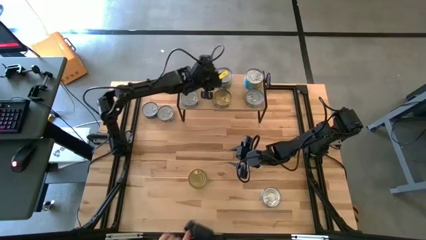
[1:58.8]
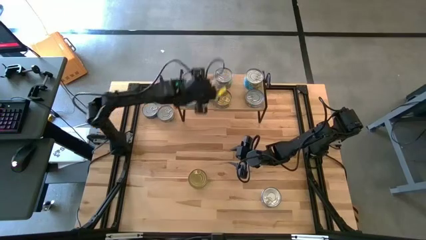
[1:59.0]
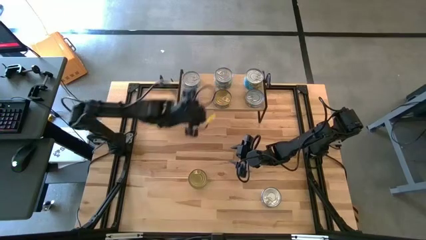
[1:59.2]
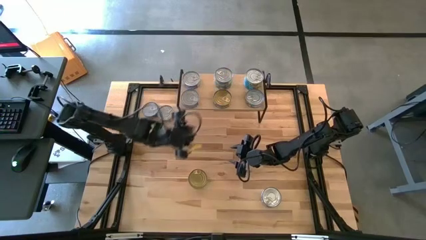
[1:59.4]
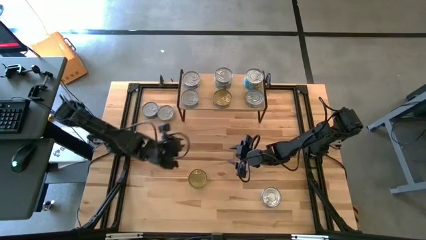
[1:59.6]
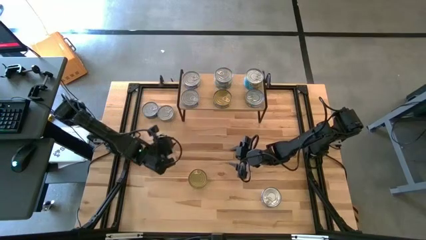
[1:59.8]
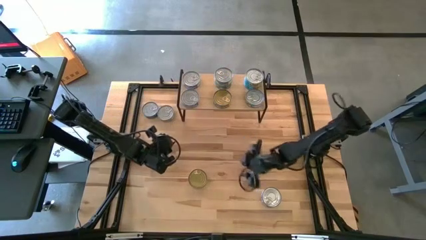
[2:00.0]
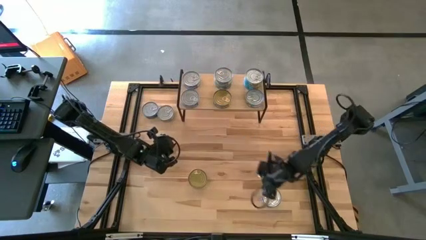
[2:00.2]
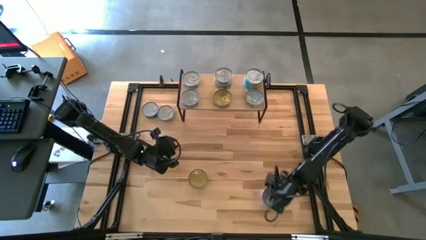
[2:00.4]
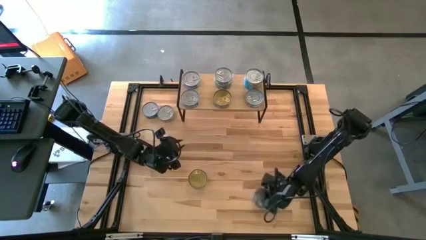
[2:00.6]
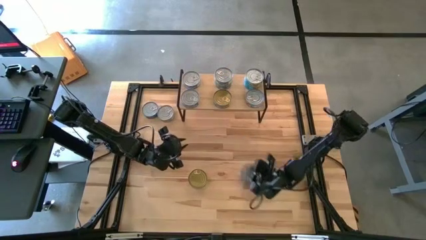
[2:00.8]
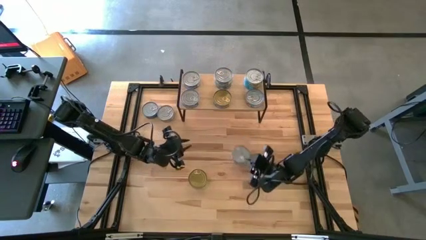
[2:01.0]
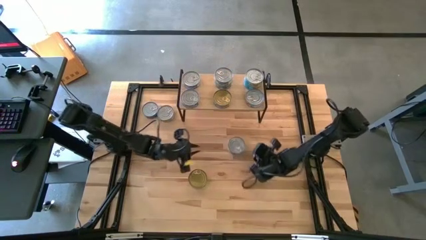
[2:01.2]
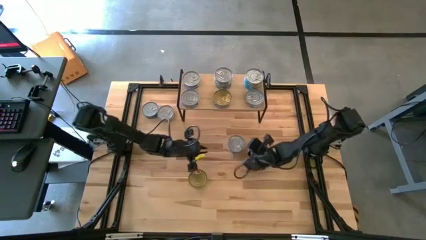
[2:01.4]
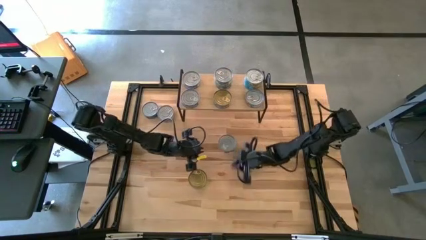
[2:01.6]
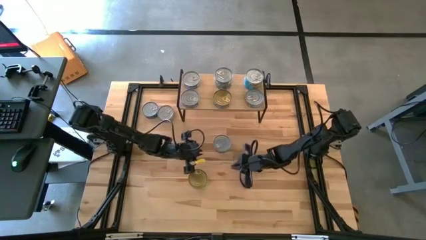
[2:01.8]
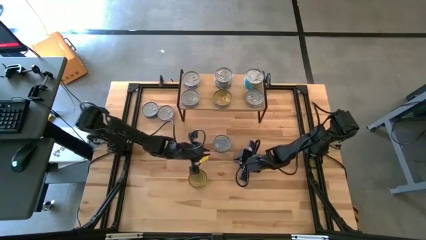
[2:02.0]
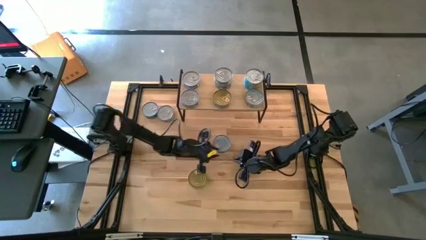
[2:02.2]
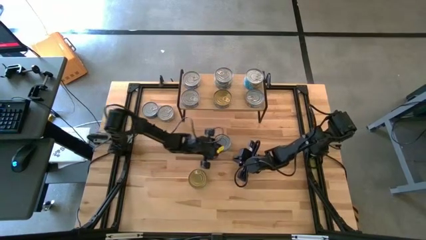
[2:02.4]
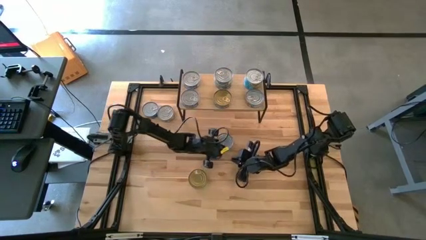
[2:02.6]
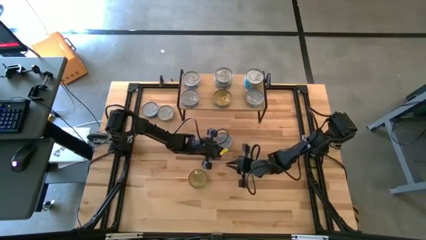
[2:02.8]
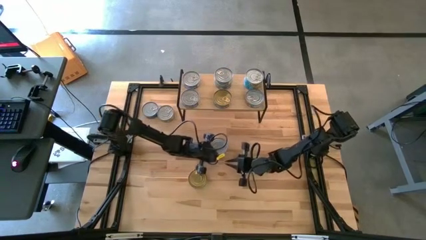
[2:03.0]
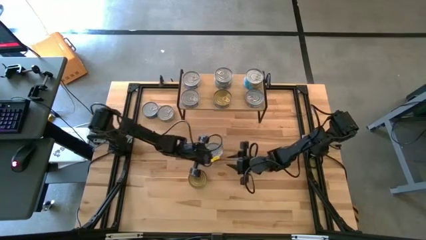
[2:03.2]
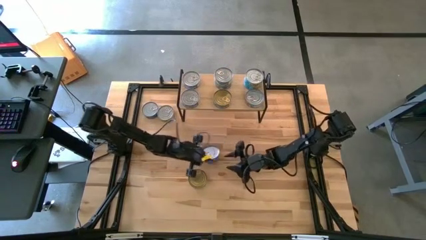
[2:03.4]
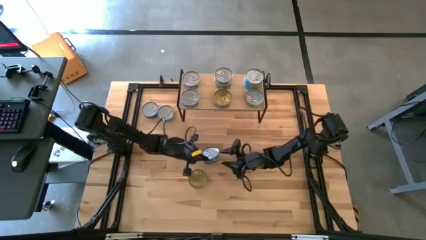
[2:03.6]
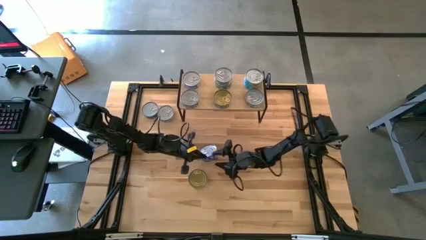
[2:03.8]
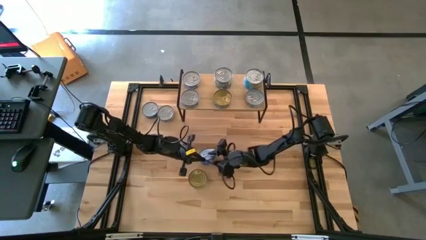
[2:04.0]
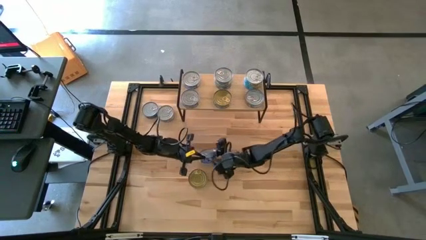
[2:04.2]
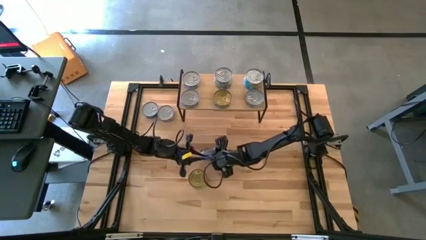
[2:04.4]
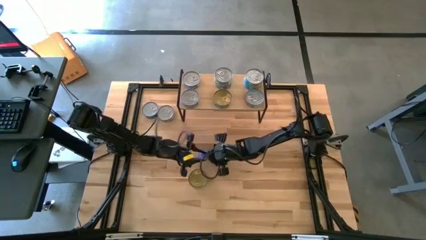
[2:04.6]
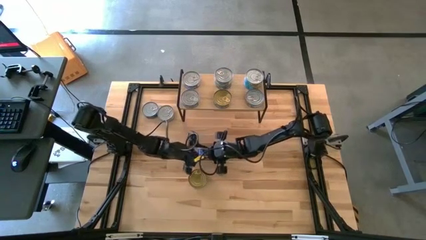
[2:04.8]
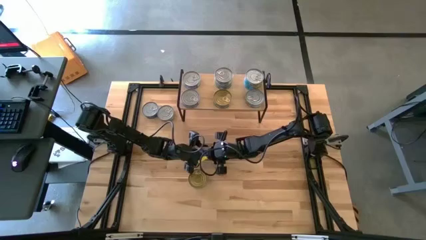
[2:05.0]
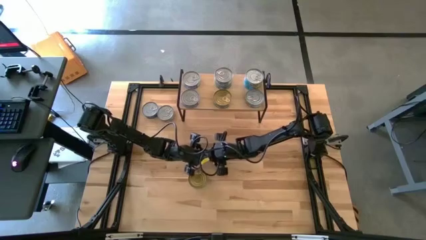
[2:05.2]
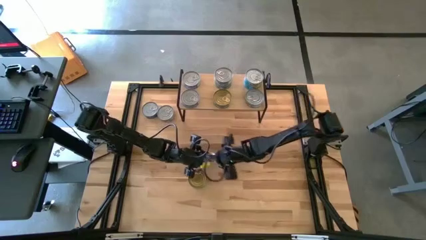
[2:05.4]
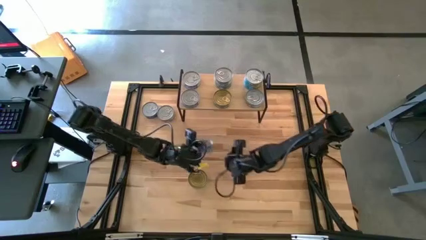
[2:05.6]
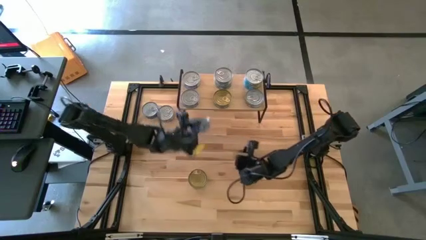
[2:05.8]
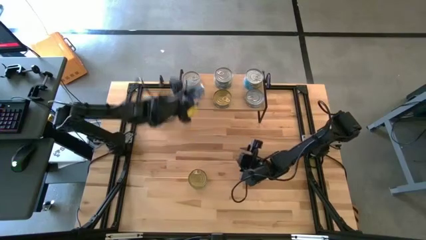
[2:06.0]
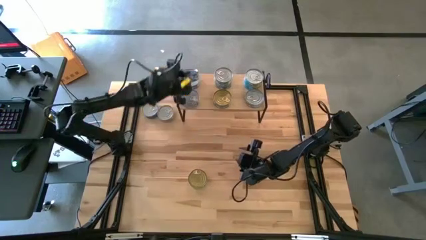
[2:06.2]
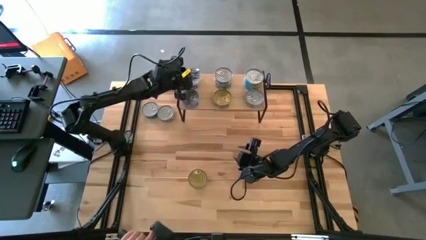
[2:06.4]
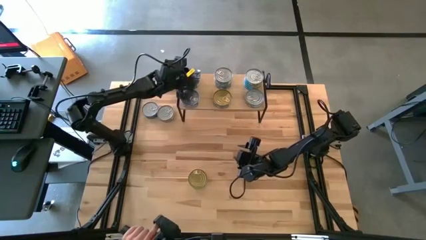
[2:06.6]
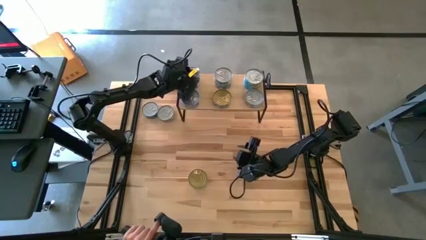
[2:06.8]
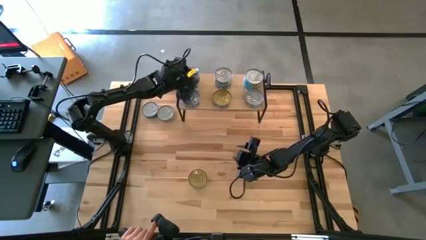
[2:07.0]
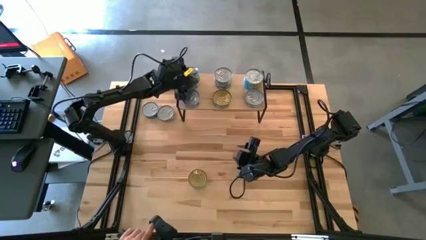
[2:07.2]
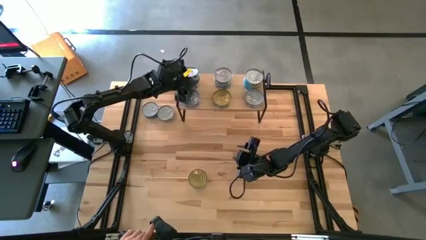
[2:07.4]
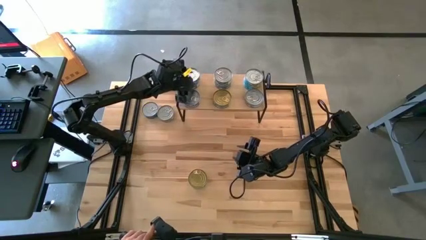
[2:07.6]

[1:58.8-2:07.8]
Task: Stack canned seafood by type on shelf
Stack the blue tuna can on top of the blue tuna can on the shelf

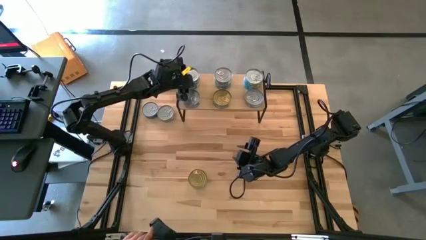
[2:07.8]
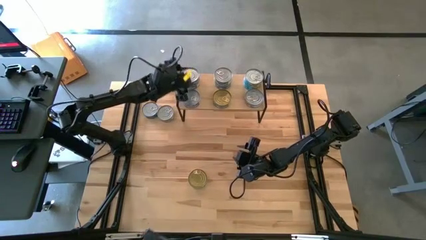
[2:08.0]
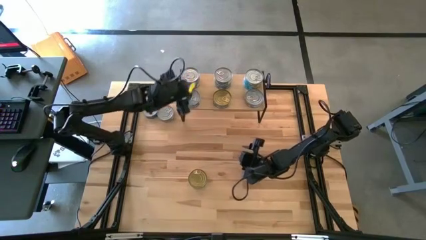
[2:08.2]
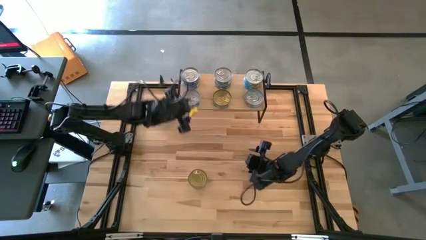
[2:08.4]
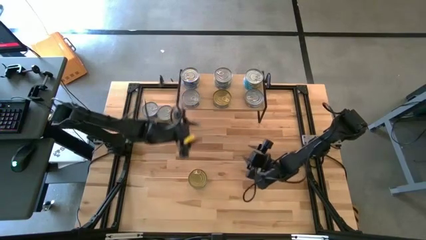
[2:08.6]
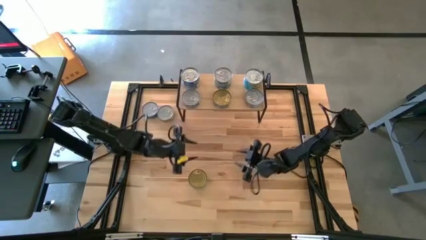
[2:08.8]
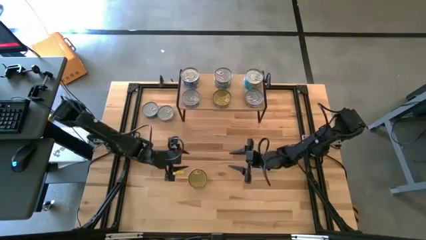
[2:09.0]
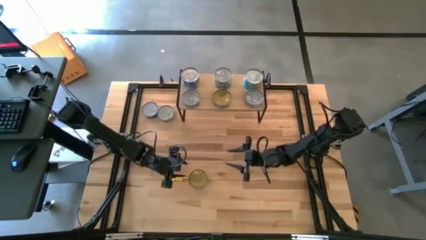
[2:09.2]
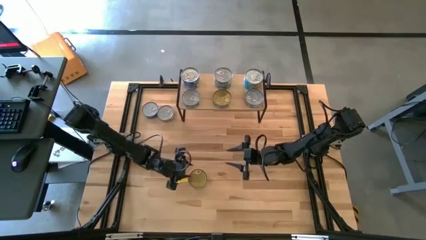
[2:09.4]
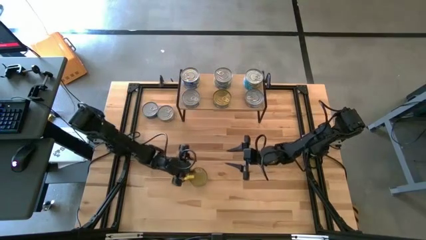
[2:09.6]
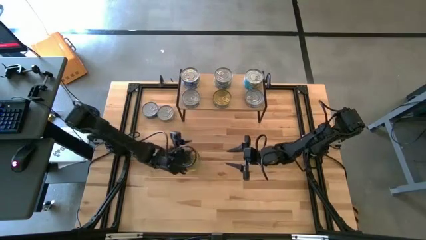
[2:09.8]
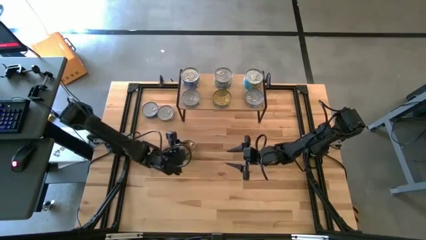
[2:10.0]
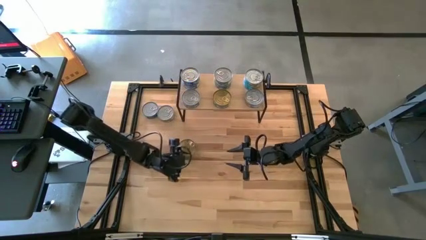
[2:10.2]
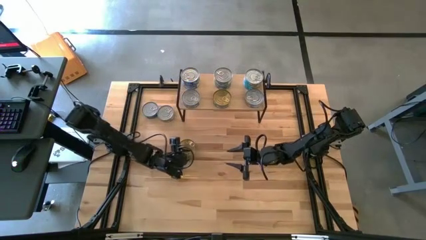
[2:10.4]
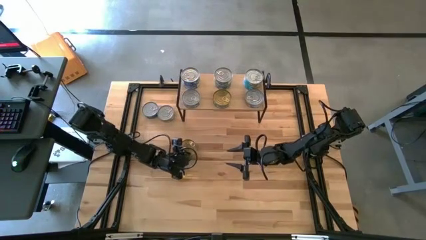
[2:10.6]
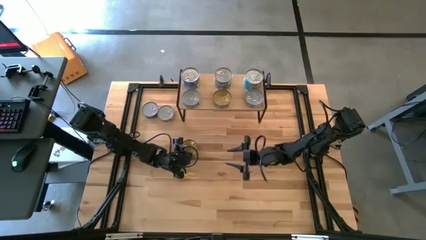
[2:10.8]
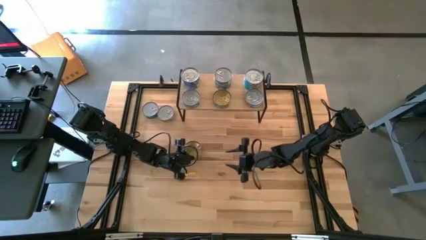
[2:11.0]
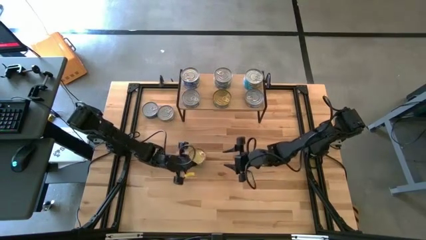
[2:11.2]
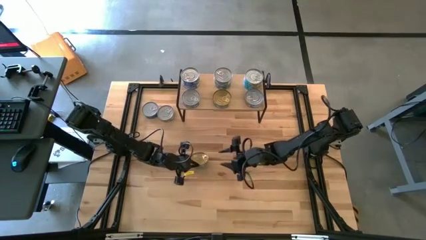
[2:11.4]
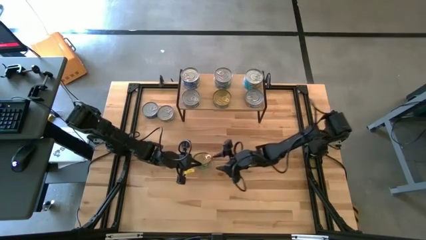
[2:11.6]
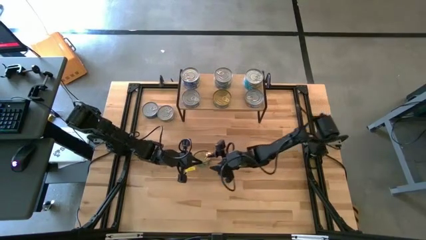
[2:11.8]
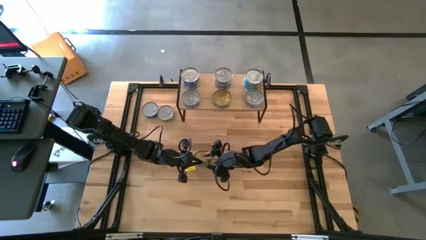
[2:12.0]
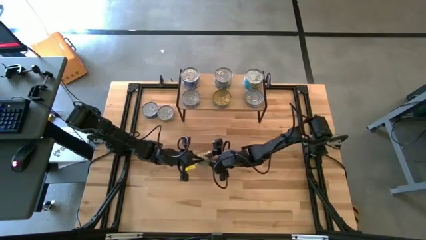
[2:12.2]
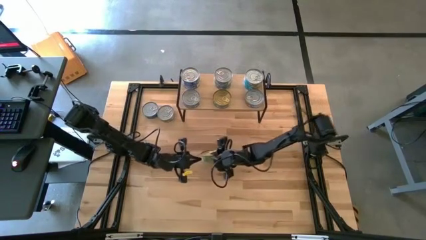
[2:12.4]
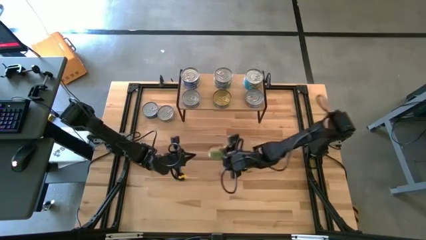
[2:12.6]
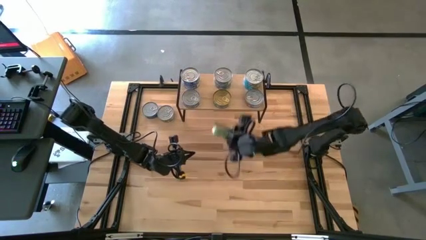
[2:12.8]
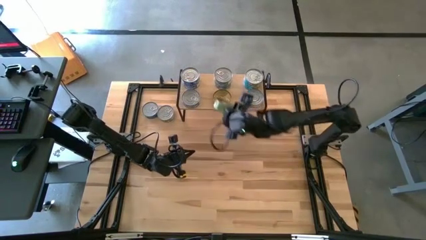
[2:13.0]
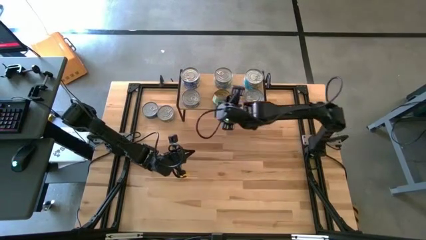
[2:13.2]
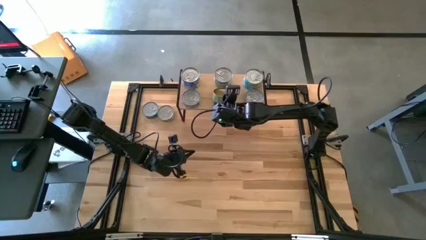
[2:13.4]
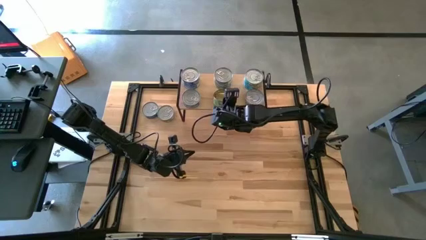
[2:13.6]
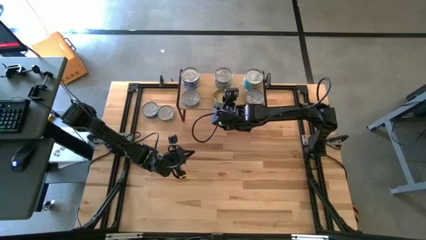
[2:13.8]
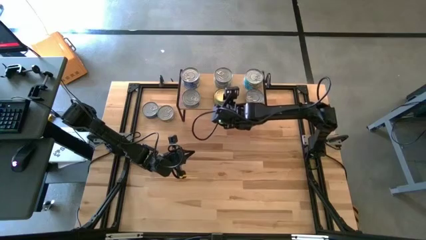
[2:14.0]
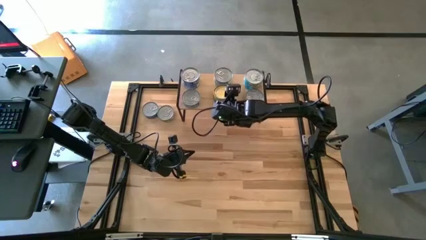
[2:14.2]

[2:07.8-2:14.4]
Stack the green tuna can on top of the green tuna can on the shelf
